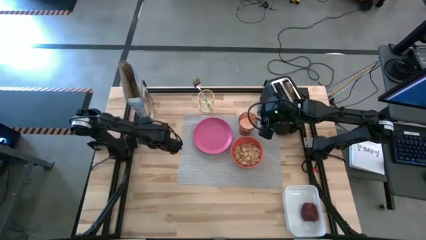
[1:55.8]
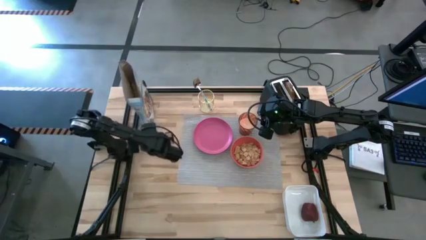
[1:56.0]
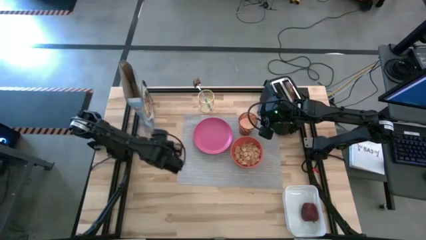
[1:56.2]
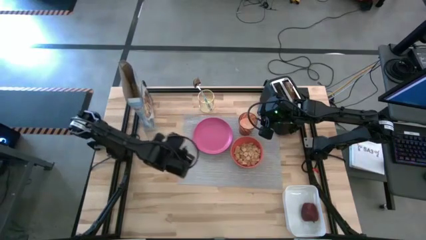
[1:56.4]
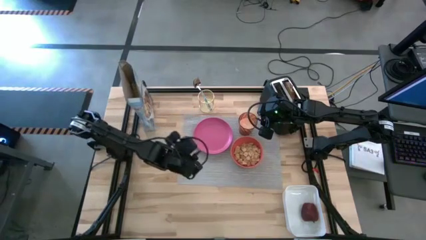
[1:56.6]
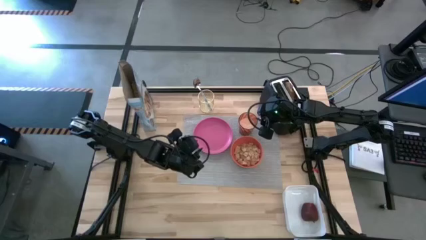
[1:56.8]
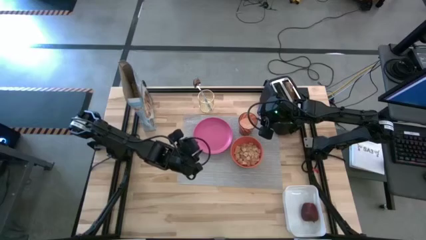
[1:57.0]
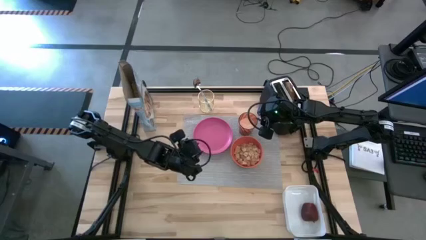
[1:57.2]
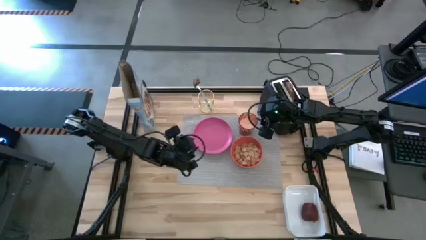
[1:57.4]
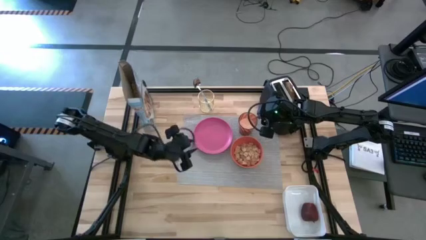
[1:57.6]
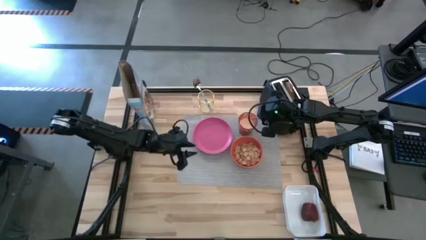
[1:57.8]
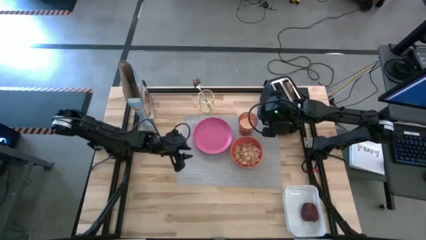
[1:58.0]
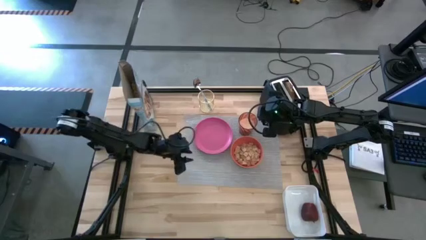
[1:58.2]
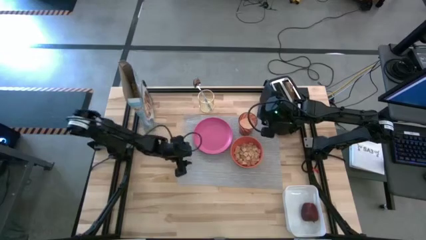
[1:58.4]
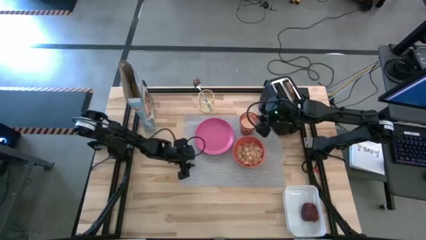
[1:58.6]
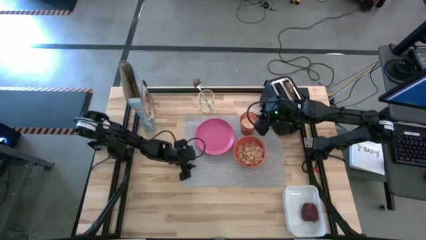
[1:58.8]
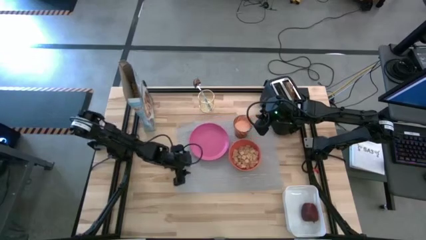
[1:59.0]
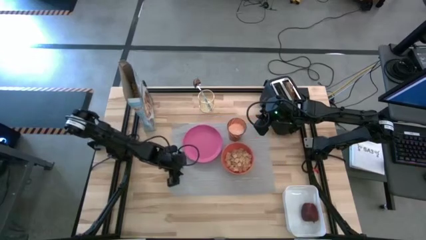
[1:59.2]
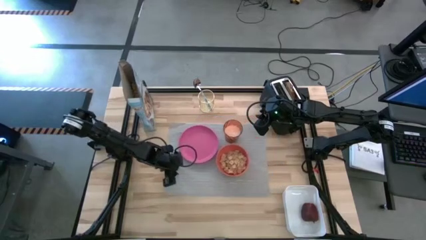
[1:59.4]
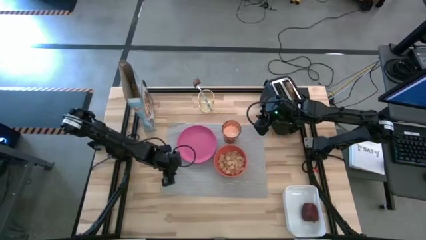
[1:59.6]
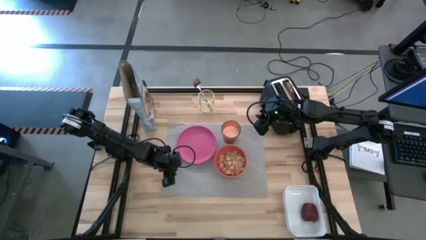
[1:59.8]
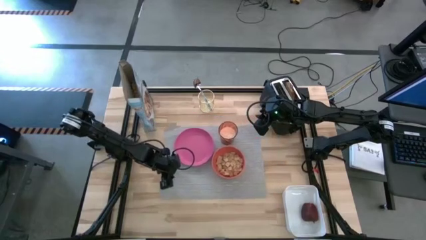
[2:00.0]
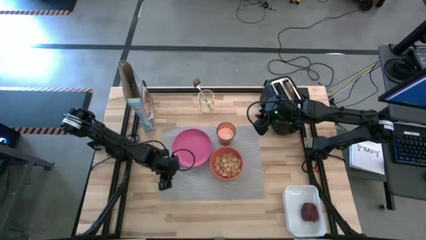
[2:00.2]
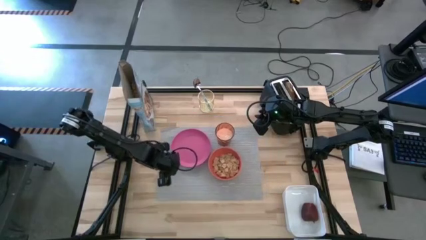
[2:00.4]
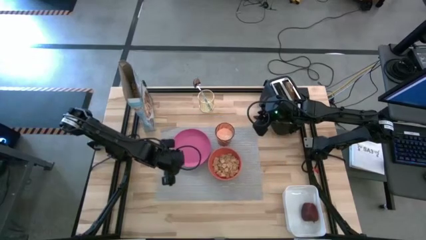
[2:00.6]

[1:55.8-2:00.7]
Task: Arrange a breakfast setting
Adjust the table mat to the center of the table

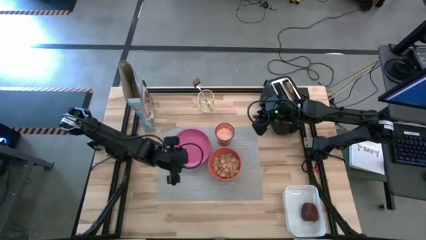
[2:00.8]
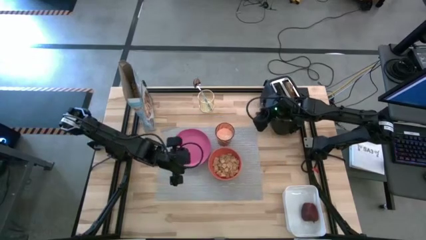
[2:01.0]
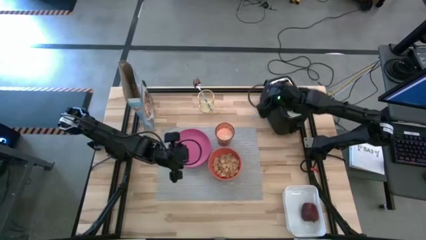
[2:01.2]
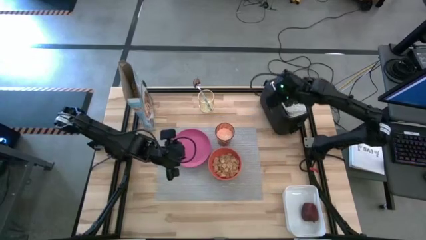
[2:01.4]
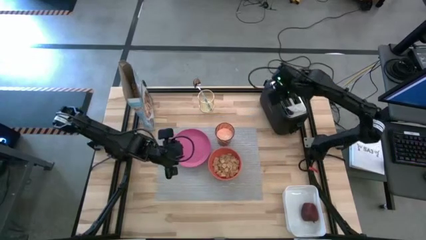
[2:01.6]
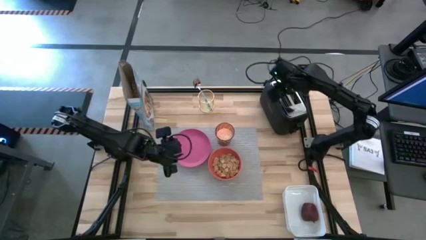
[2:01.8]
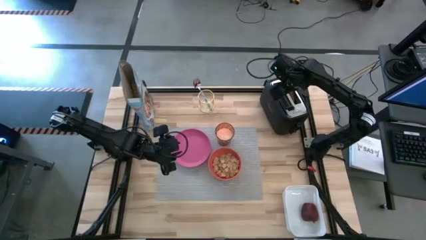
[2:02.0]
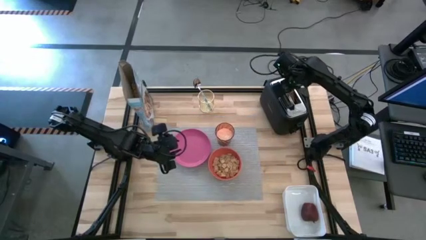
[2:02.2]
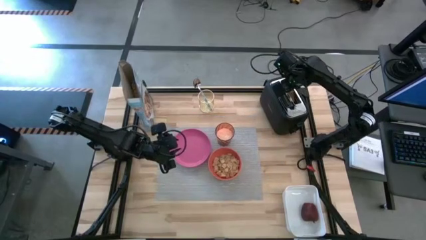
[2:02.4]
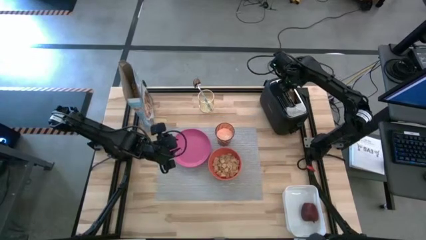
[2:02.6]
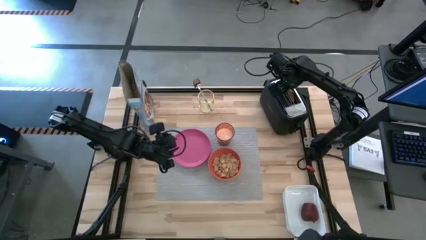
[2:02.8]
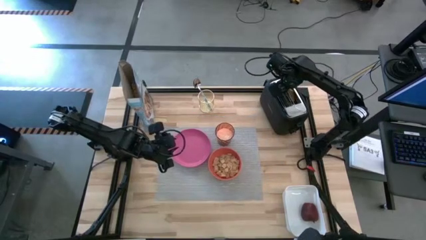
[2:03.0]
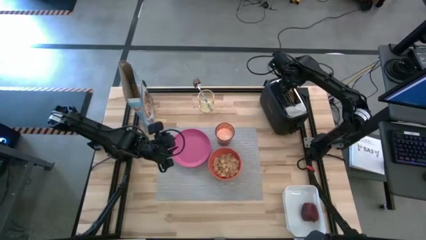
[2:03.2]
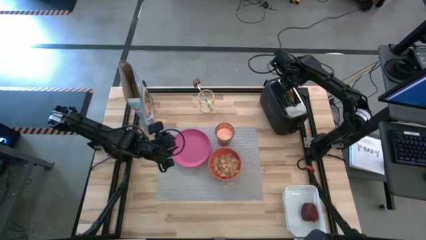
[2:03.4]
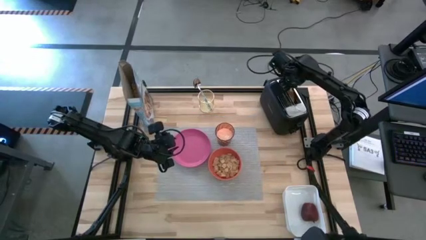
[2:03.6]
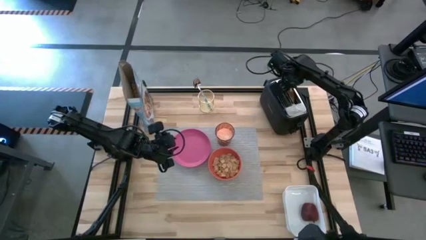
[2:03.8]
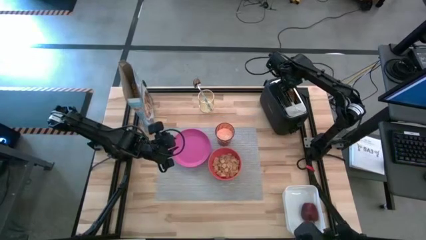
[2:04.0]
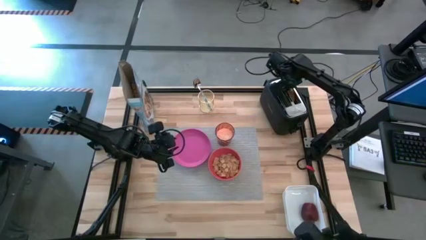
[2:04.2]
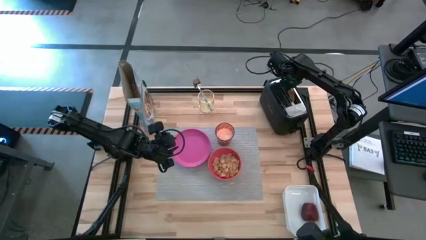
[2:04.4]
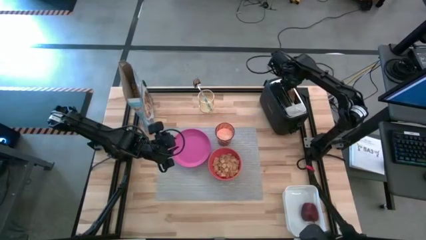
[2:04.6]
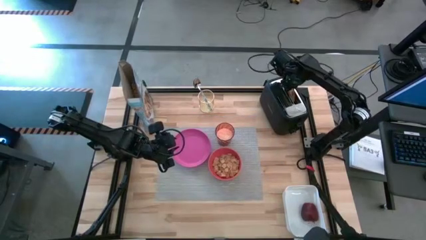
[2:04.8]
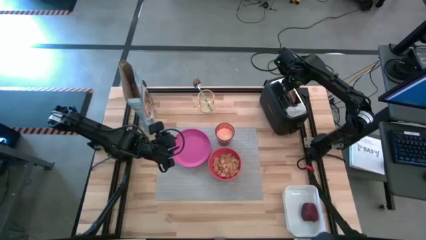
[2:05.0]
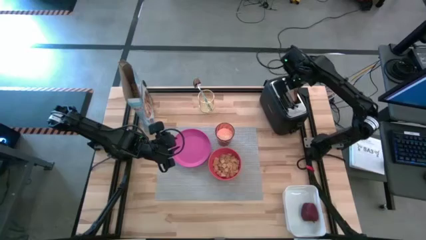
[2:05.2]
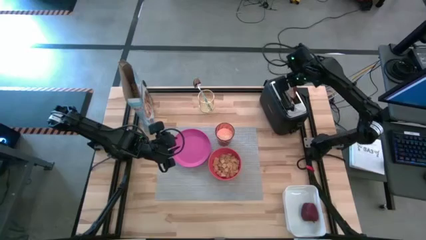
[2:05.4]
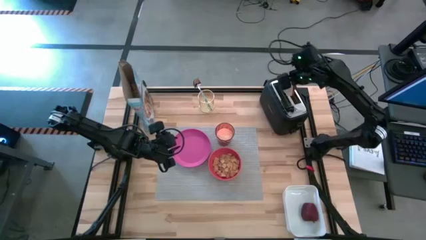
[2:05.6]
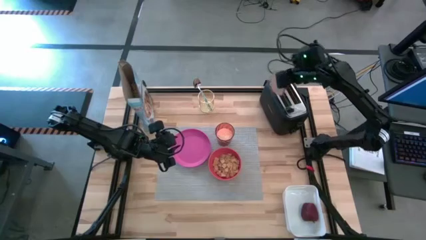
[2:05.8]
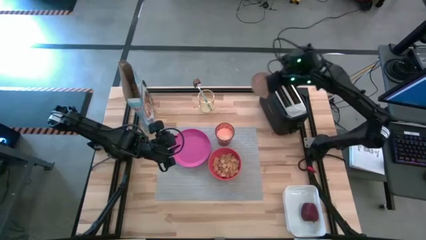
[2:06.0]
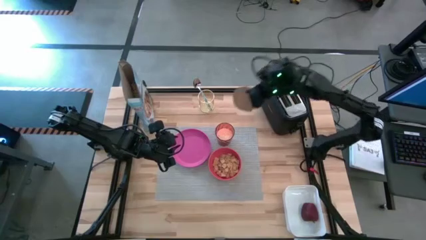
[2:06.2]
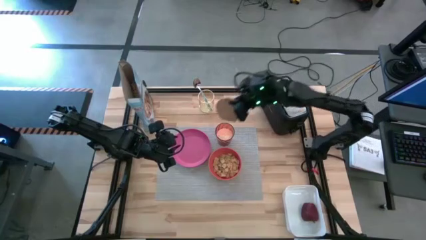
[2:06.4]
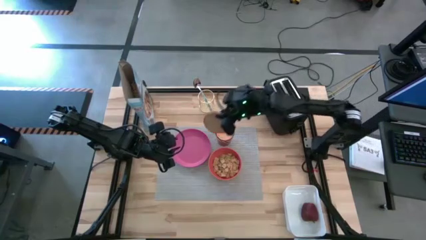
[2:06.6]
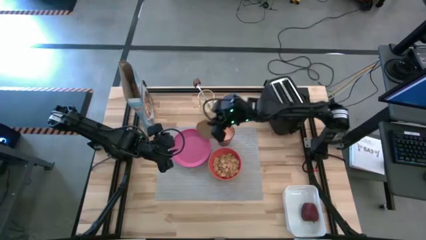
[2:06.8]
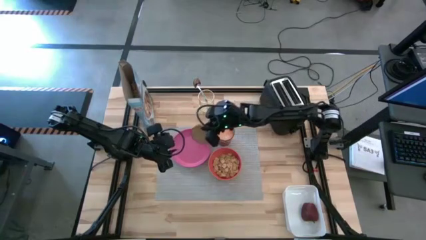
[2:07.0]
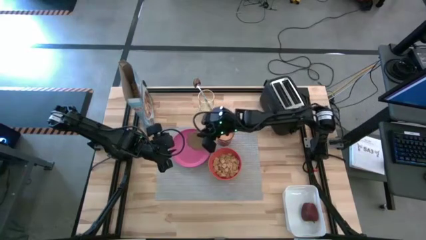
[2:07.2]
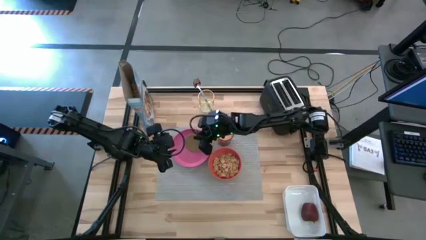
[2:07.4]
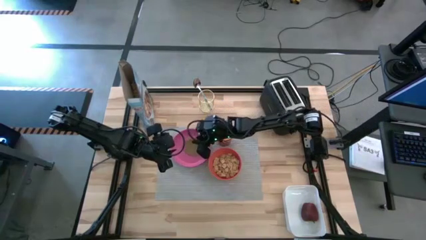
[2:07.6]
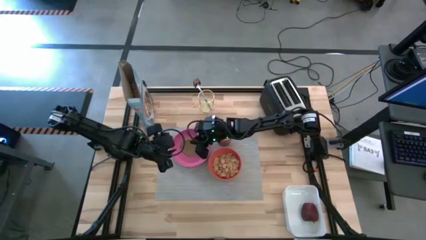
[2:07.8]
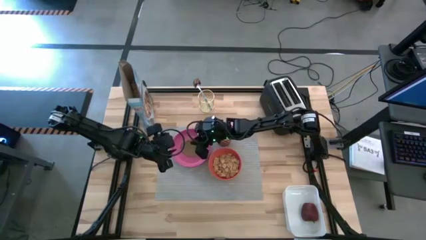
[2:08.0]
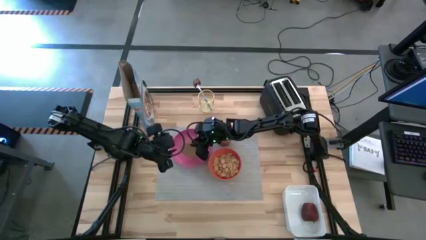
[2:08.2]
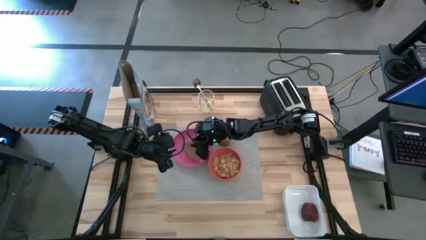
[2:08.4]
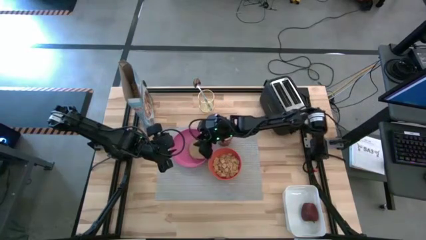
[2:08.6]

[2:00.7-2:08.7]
Put the bagel from the toaster on the pink plate

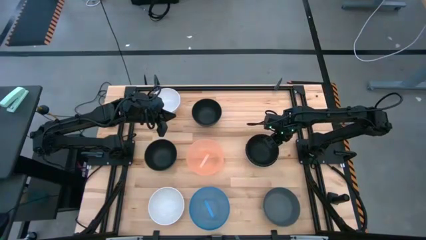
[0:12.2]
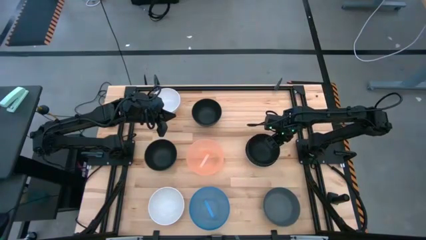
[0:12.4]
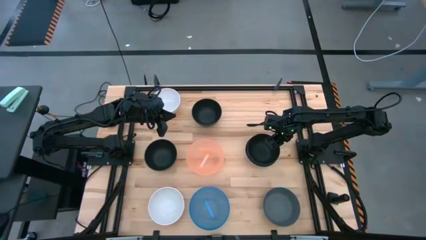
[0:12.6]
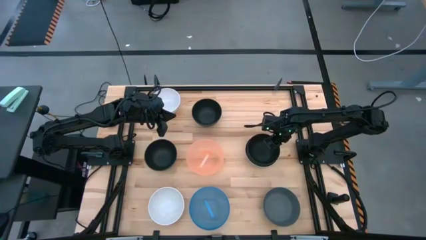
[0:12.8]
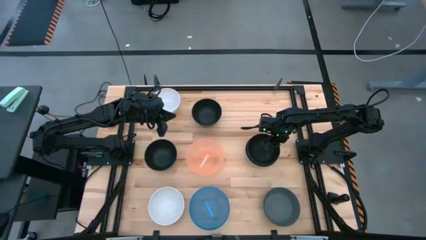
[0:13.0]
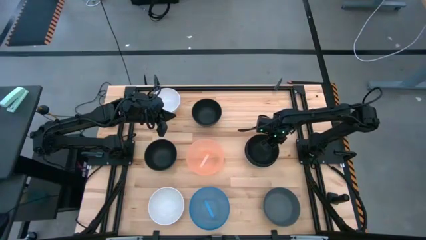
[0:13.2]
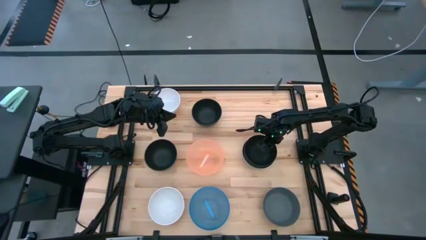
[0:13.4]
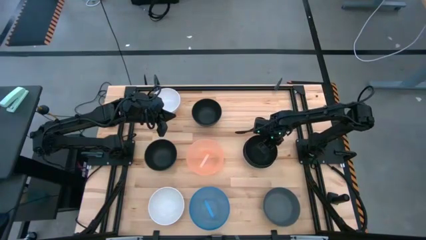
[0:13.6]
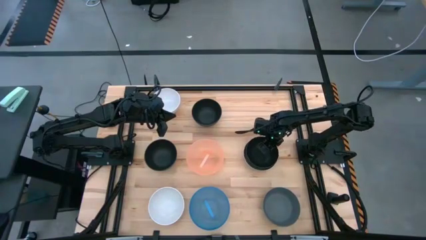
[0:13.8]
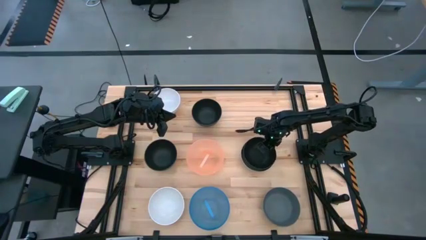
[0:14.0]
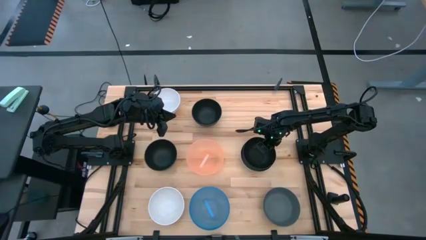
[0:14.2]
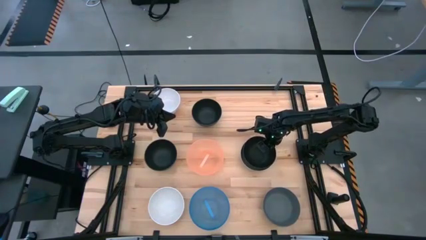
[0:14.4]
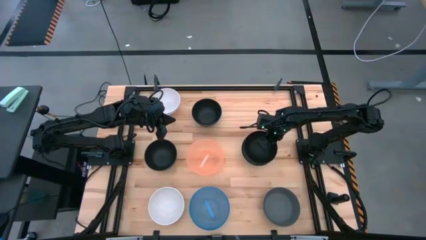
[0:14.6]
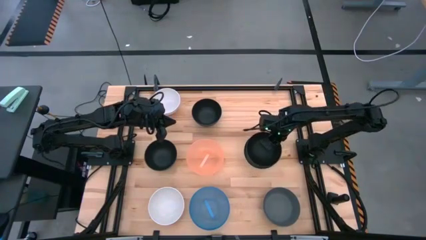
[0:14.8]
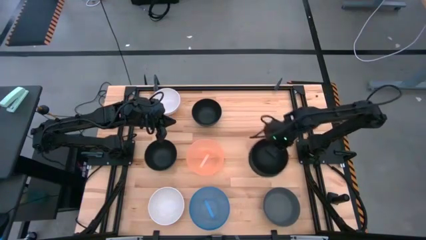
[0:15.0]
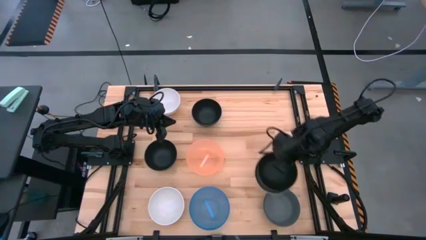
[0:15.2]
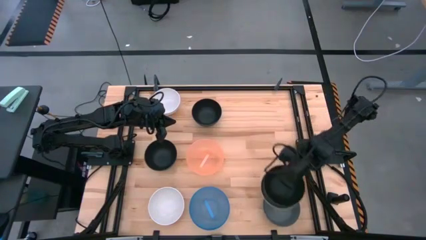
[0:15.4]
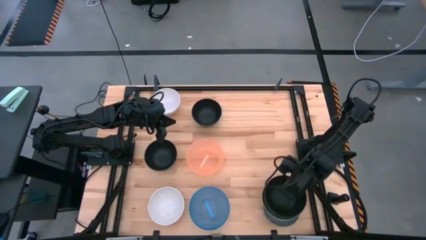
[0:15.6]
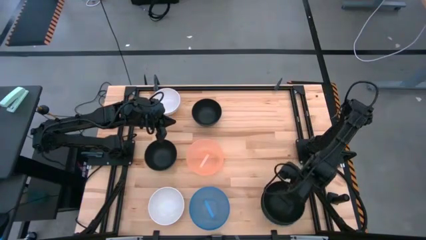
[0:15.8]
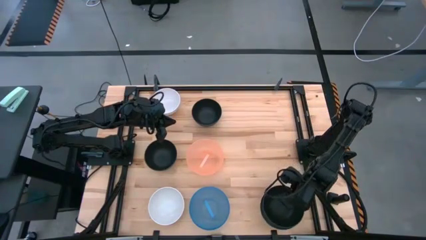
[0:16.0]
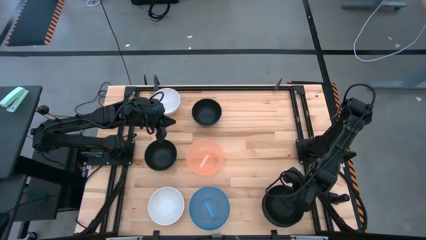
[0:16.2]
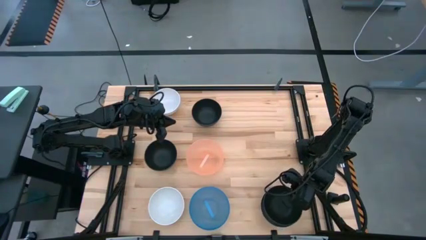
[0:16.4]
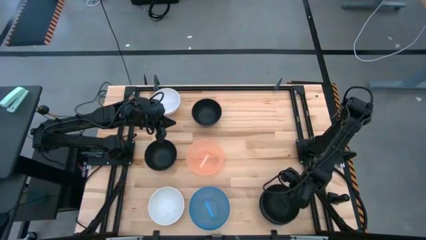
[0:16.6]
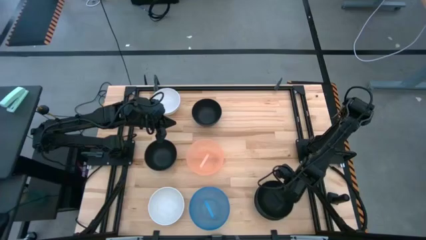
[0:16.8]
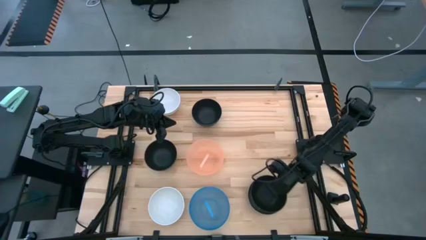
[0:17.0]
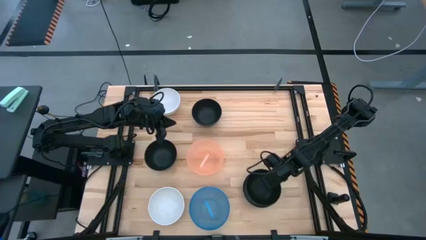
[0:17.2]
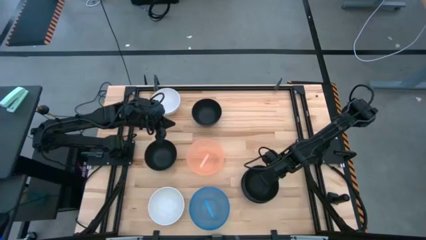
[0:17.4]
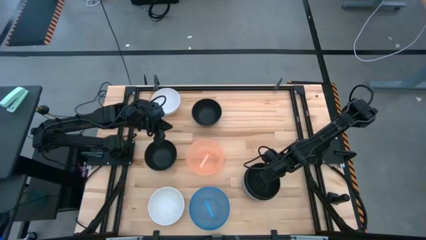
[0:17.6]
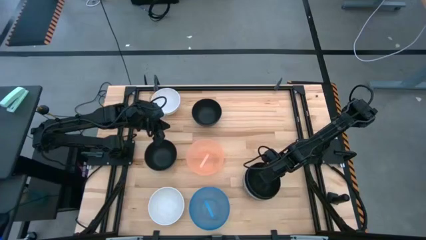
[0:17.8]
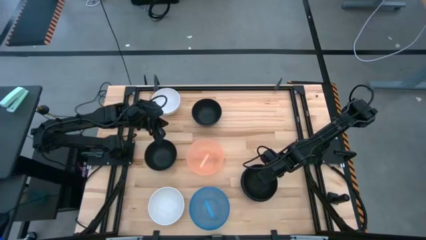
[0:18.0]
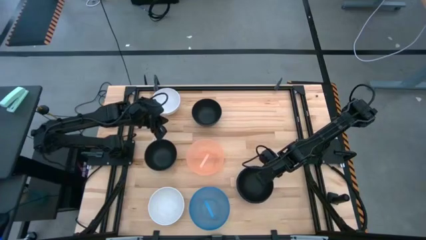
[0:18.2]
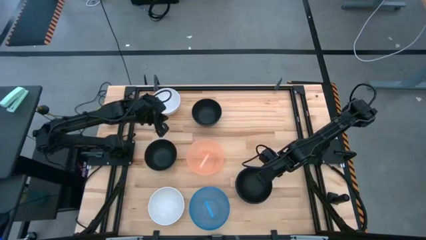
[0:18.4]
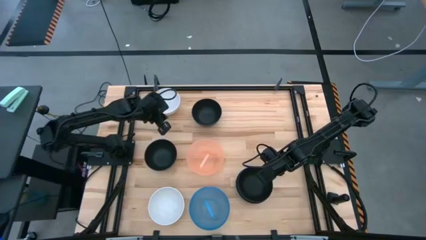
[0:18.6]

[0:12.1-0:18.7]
Task: Nest bowls inside each other
Stack the stacked bowls on top of the dark grey bowl
